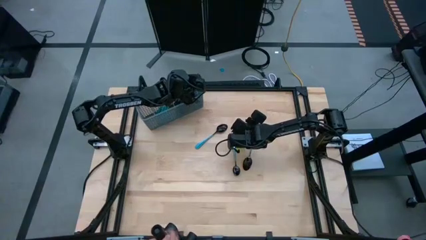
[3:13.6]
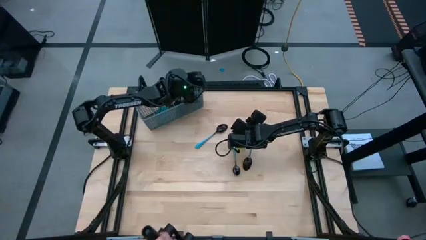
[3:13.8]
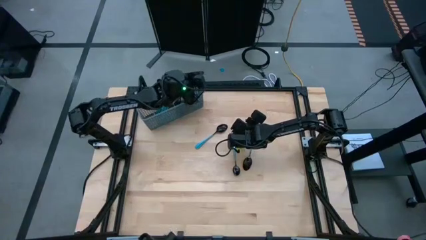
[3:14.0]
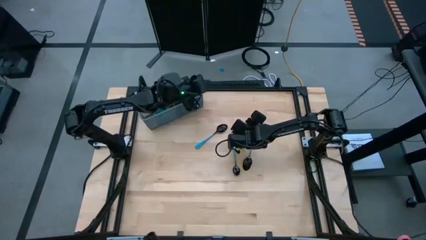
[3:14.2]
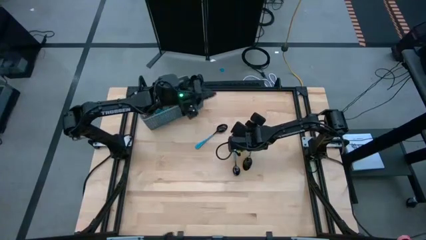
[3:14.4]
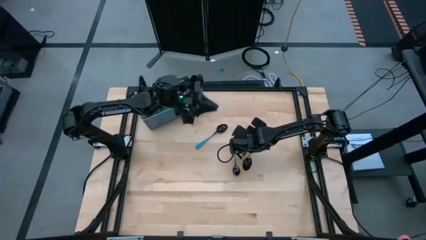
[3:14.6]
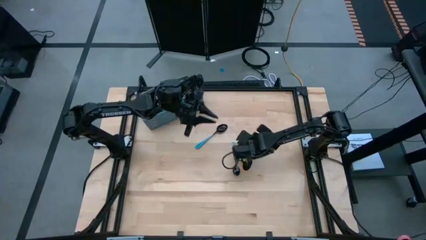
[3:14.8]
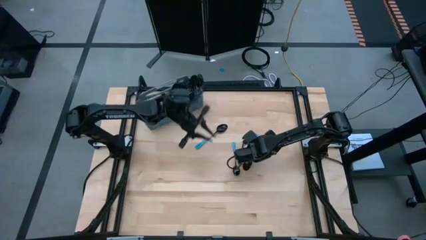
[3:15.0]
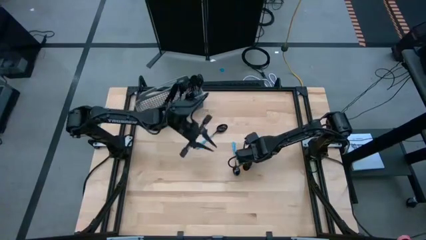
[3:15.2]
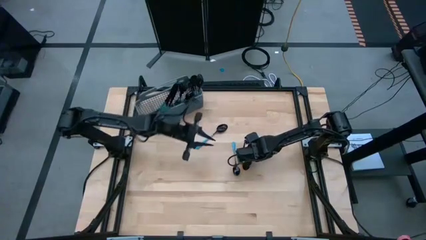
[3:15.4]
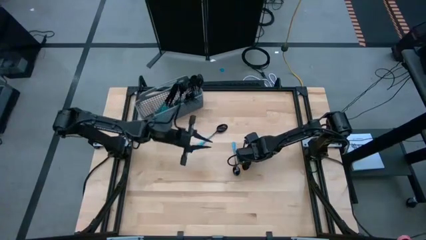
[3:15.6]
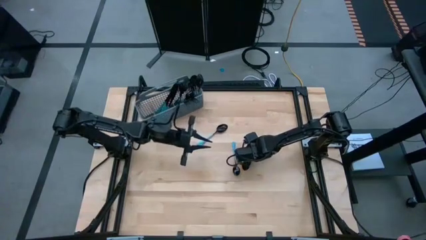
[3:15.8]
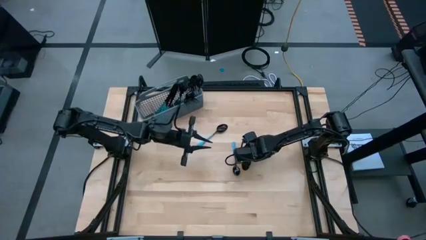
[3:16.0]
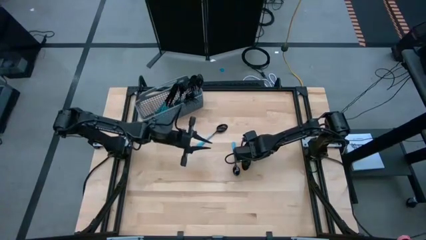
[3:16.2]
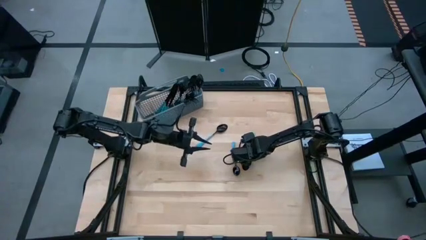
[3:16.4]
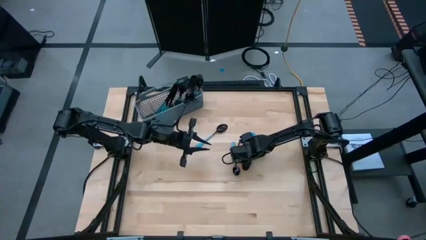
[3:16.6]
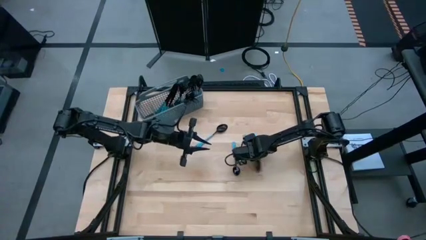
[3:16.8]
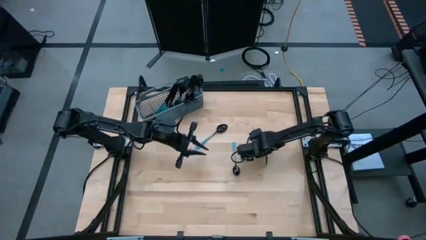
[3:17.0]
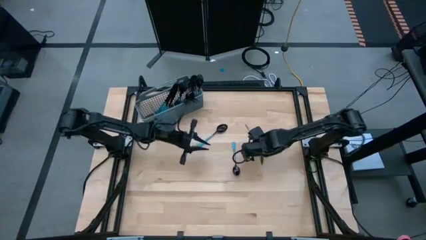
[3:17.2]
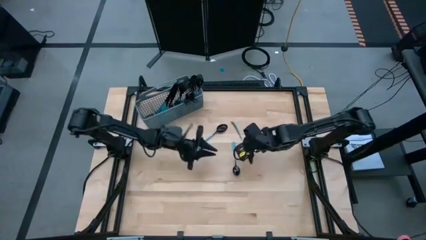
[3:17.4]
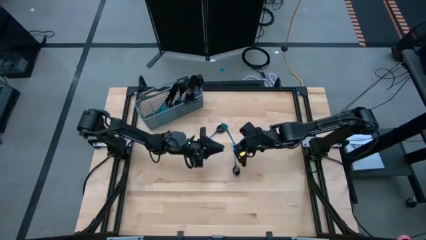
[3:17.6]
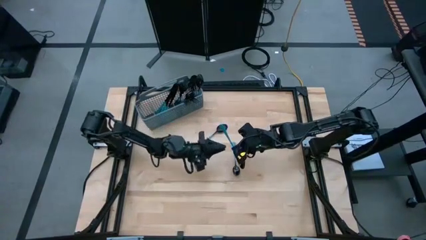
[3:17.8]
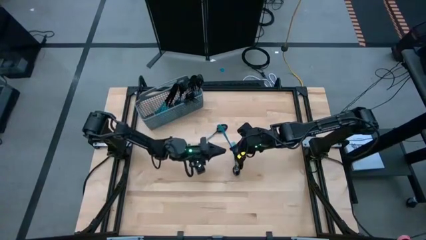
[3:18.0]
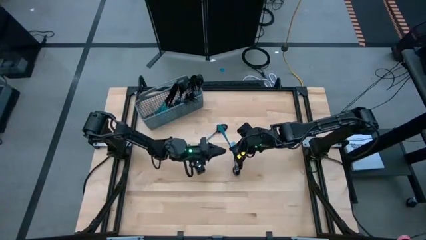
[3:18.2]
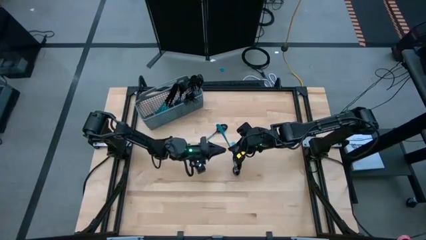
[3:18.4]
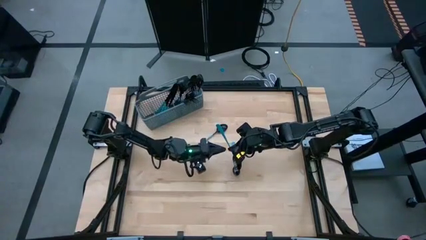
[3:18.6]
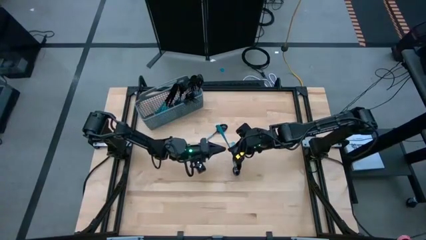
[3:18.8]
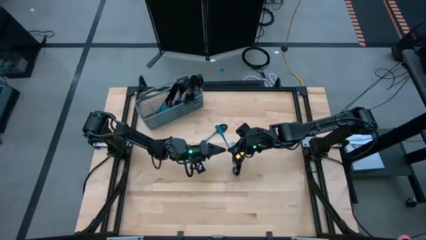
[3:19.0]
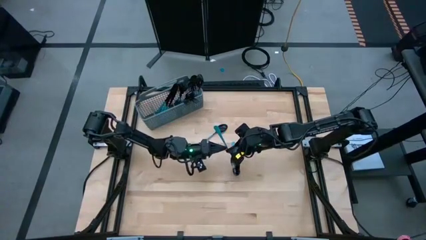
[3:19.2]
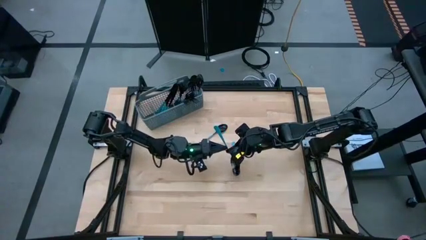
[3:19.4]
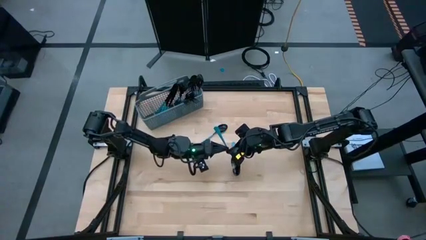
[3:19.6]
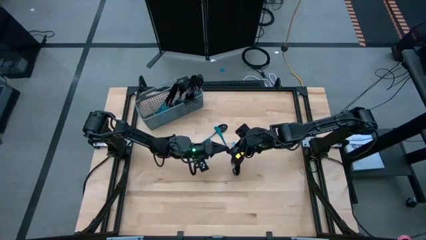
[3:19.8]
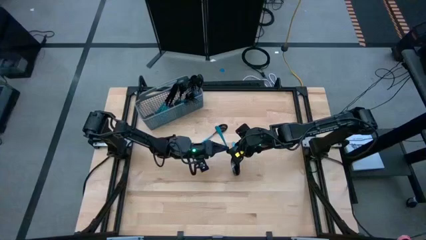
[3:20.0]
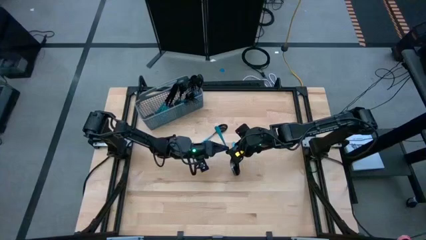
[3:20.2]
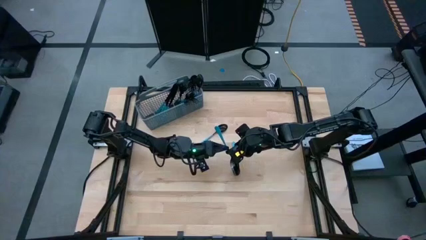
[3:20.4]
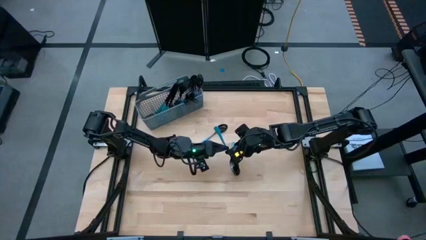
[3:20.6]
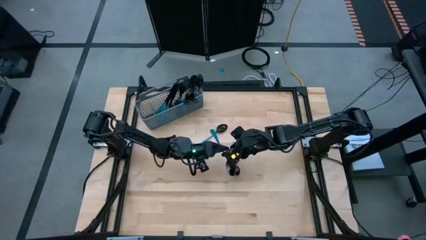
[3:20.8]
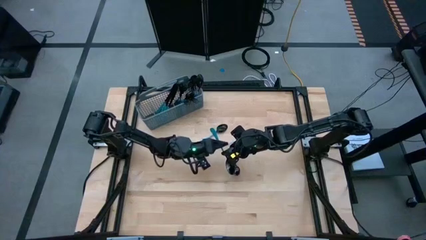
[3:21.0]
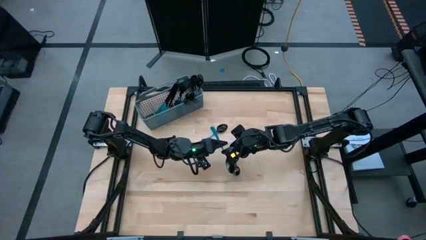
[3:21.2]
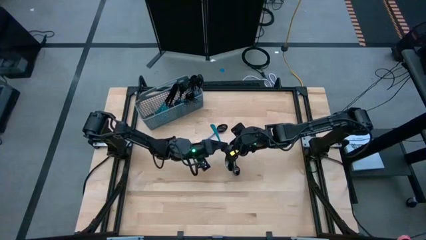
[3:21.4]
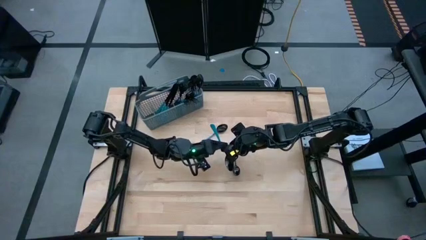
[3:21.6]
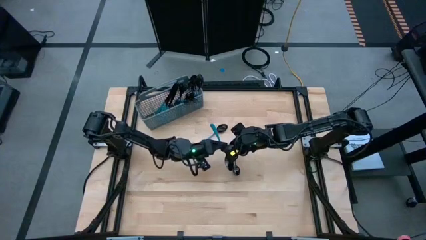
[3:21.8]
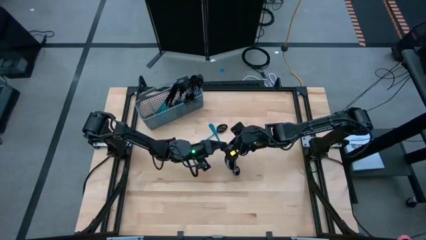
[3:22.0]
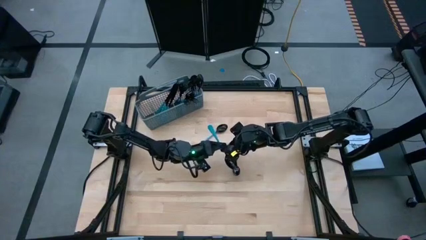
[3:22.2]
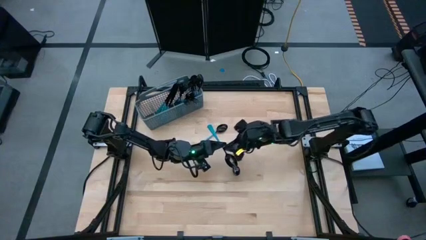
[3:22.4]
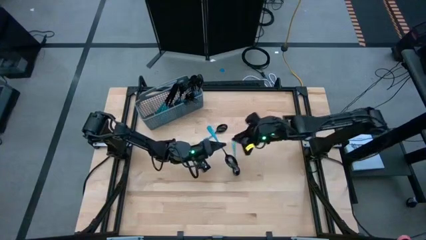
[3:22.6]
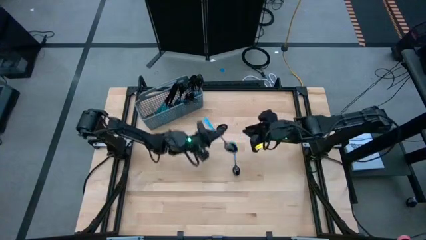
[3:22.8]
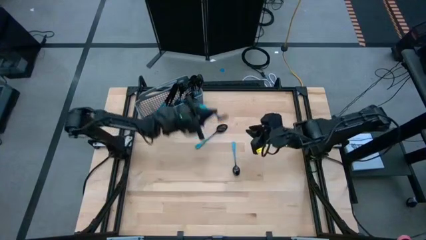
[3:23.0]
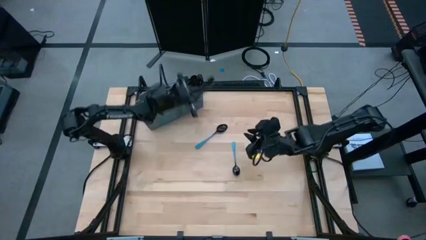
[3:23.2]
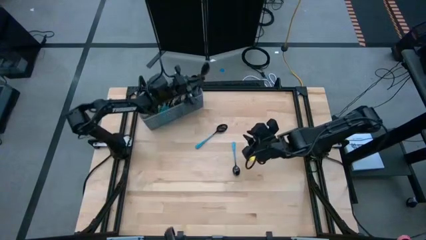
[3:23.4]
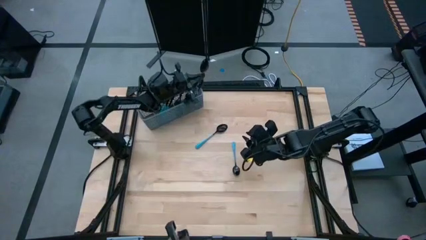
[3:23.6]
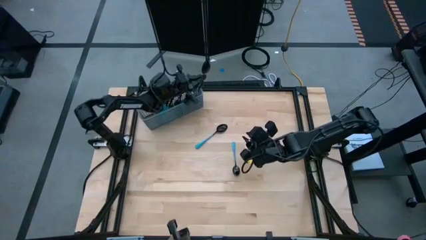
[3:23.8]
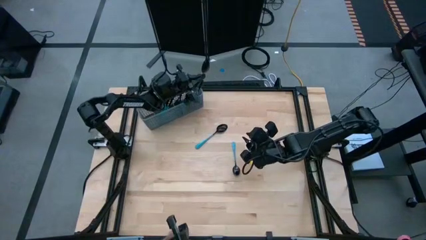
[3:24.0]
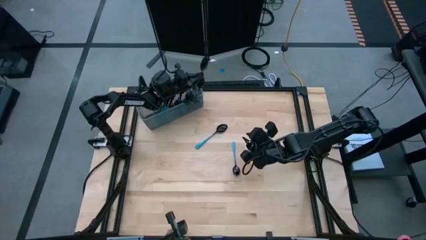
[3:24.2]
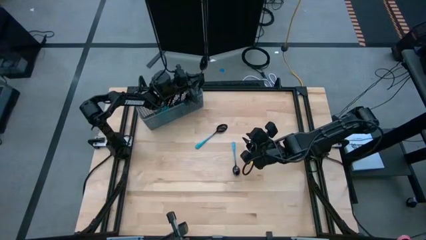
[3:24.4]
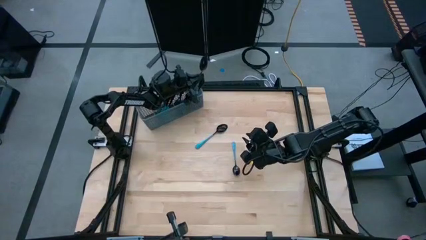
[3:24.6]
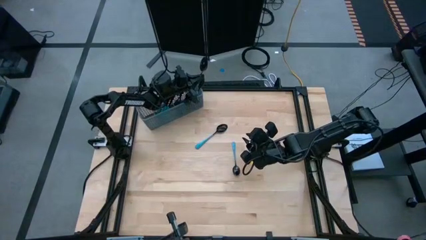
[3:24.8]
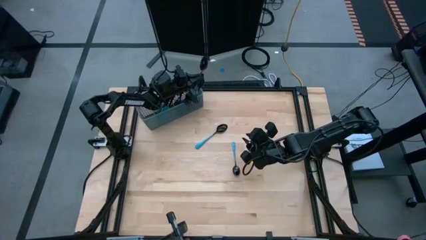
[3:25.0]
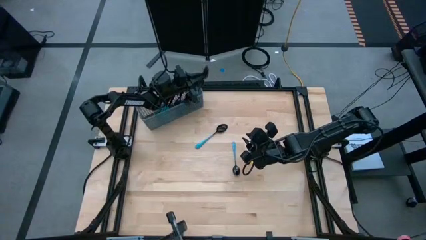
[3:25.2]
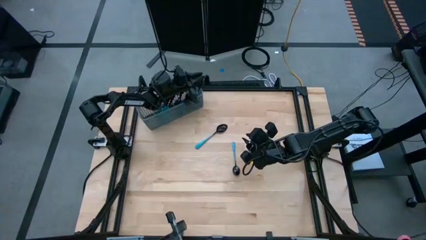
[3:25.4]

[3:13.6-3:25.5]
Task: Sort silverware
Put the blue spoon in the silverware rack

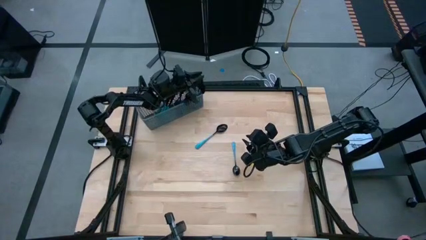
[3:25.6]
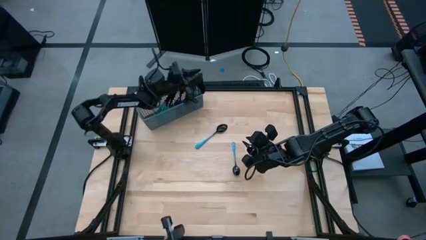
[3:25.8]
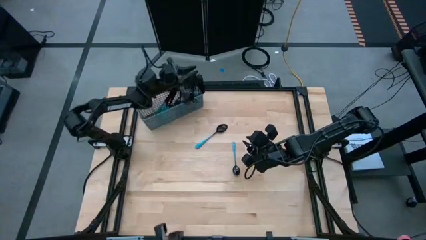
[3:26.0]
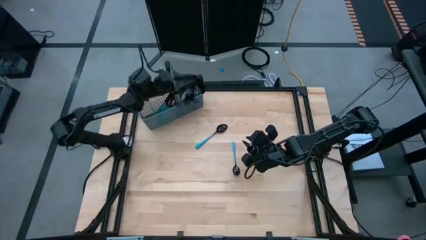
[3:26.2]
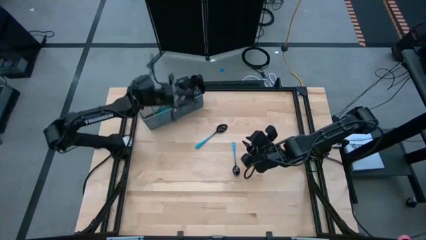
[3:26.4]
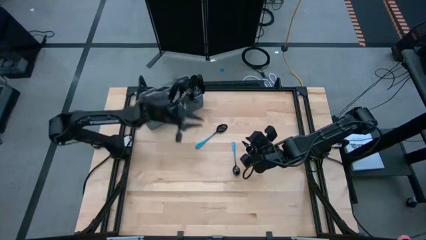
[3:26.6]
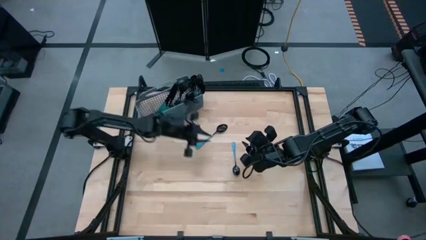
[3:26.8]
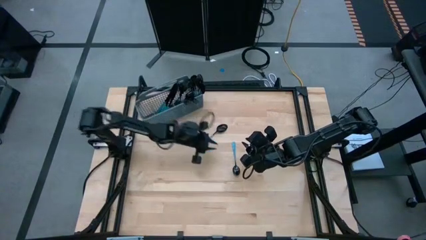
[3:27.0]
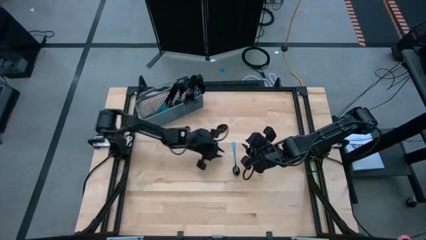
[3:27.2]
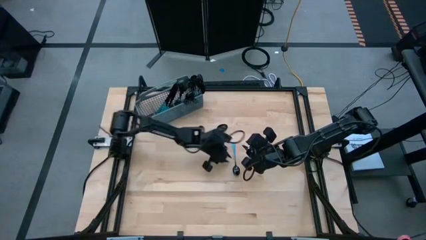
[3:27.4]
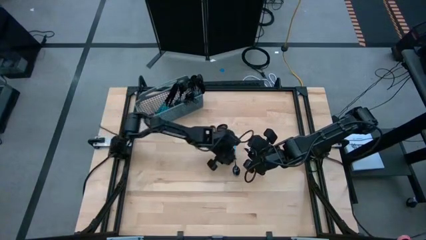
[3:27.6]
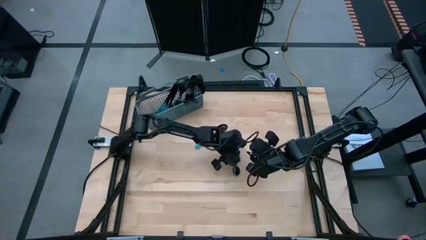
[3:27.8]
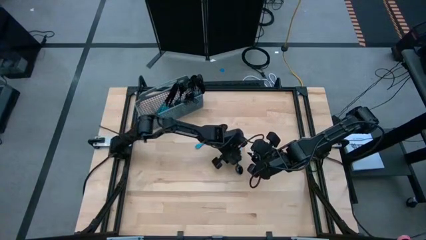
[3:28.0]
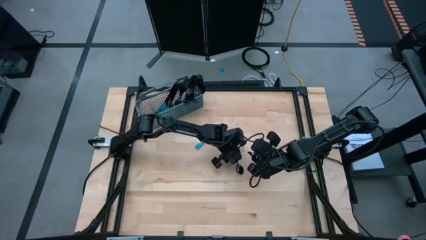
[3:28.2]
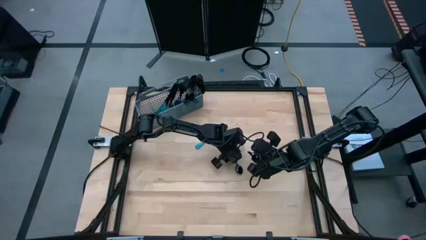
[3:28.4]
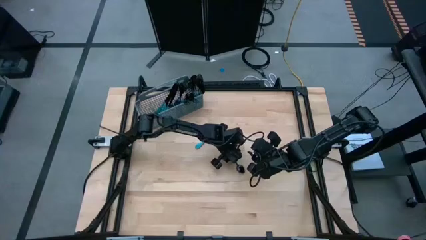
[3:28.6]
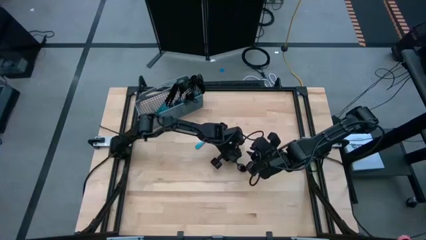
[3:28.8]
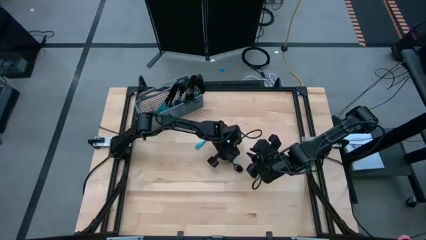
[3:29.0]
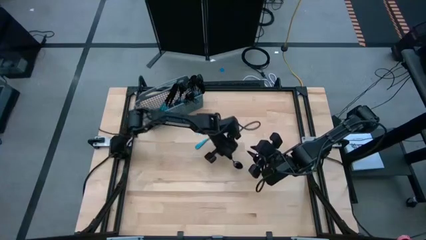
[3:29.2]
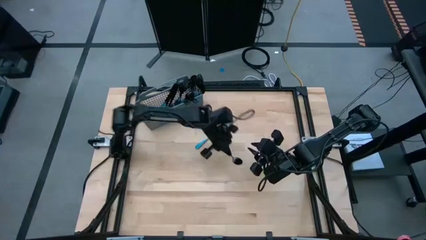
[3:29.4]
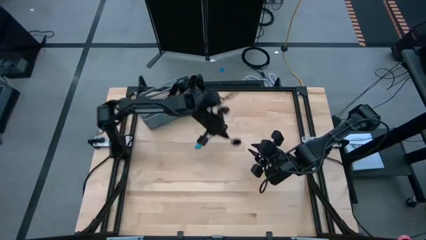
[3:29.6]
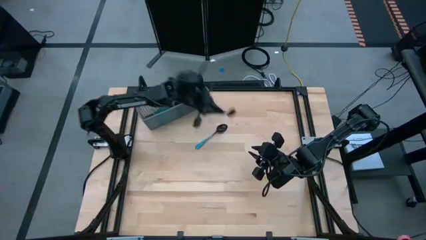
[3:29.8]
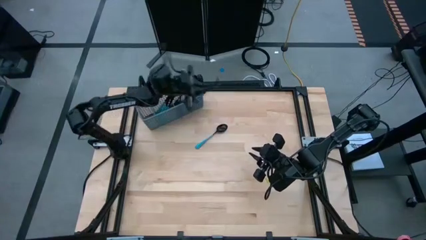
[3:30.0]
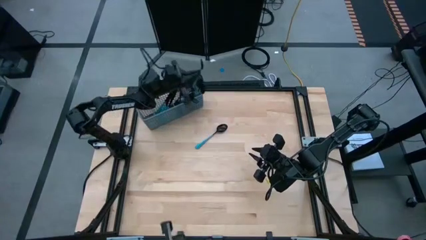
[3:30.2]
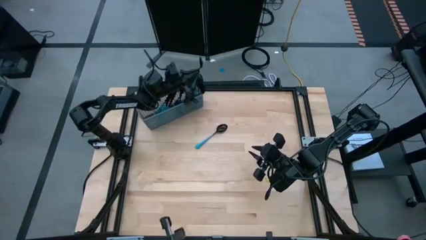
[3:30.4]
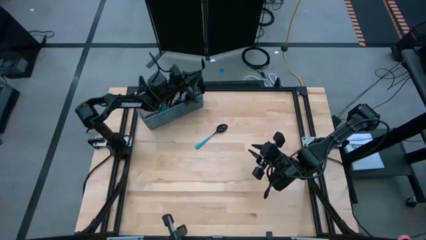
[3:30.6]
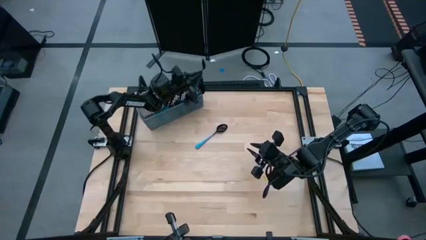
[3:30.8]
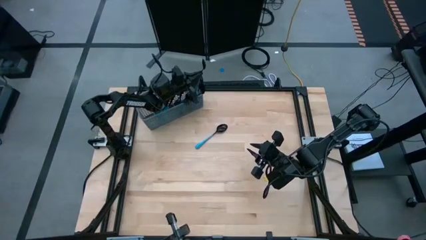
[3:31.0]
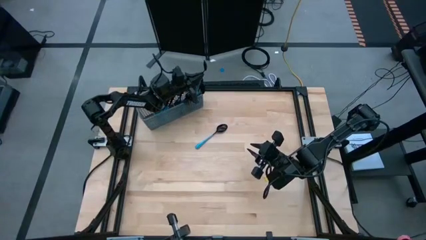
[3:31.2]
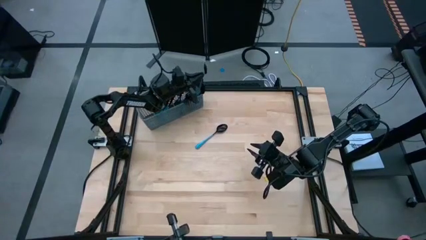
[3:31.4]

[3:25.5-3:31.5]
Put the blue spoon in the silverware rack
